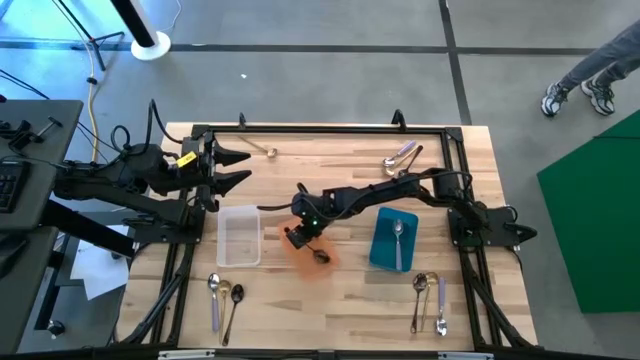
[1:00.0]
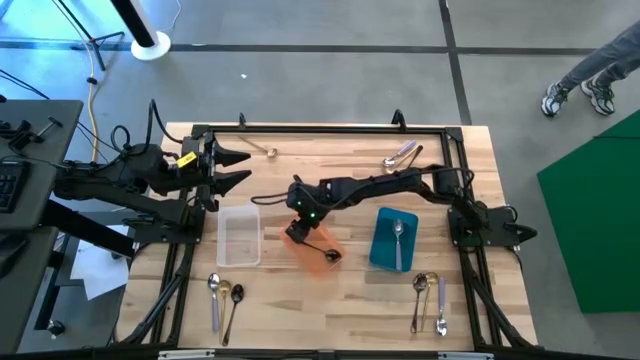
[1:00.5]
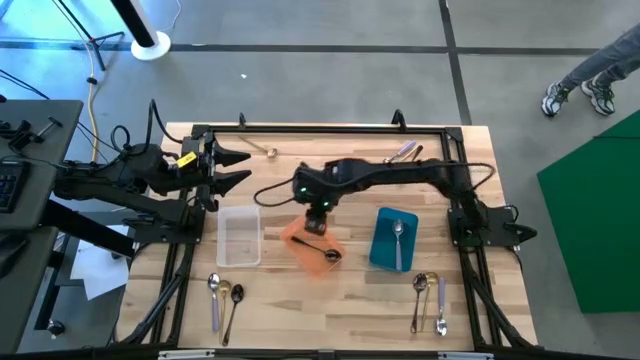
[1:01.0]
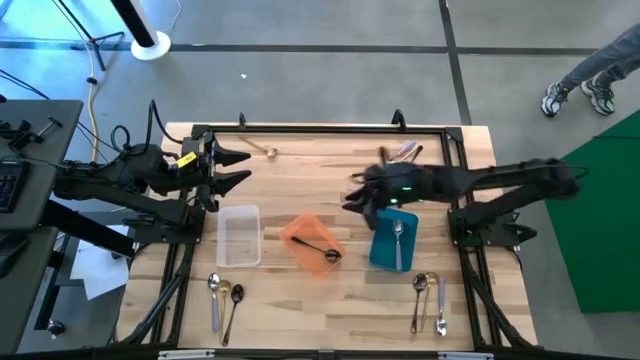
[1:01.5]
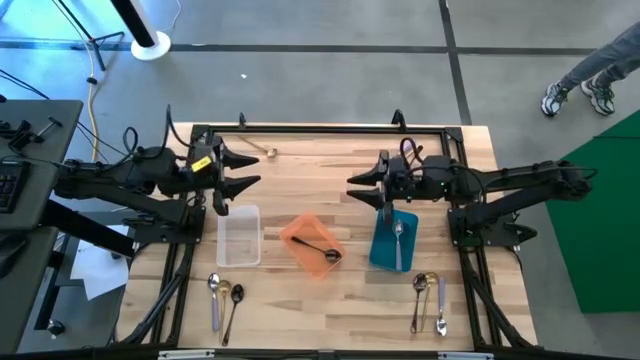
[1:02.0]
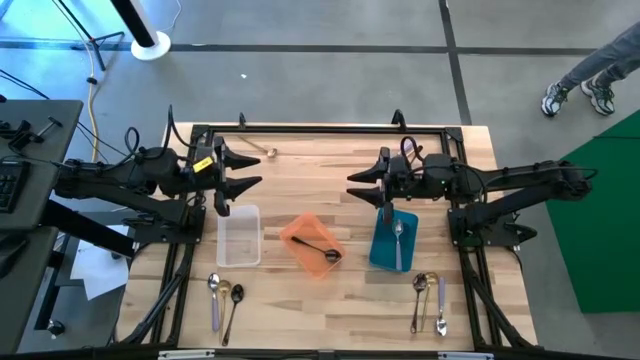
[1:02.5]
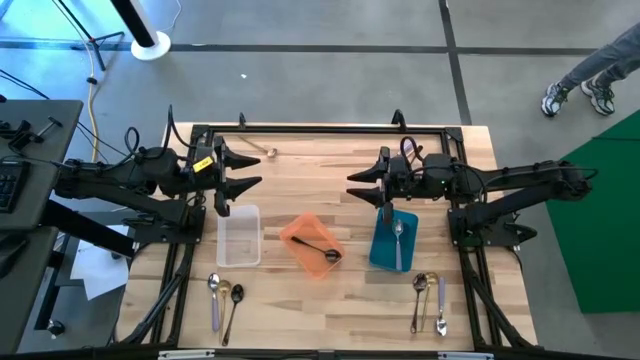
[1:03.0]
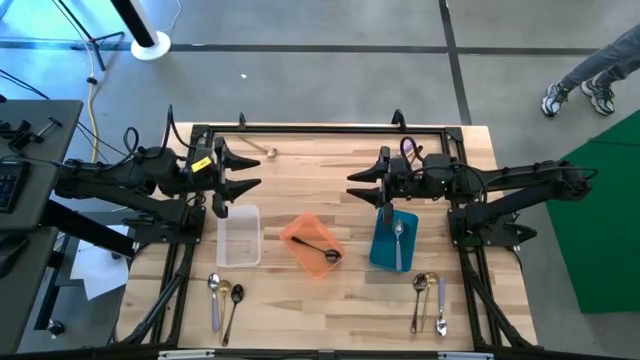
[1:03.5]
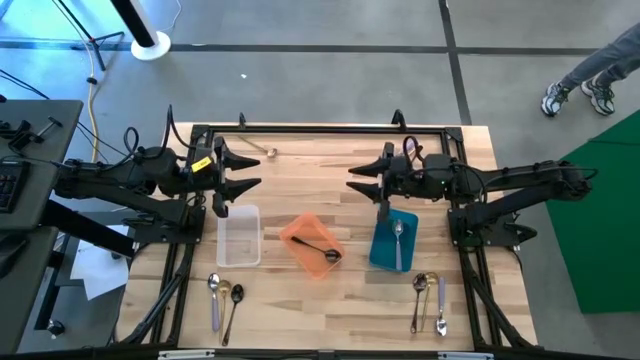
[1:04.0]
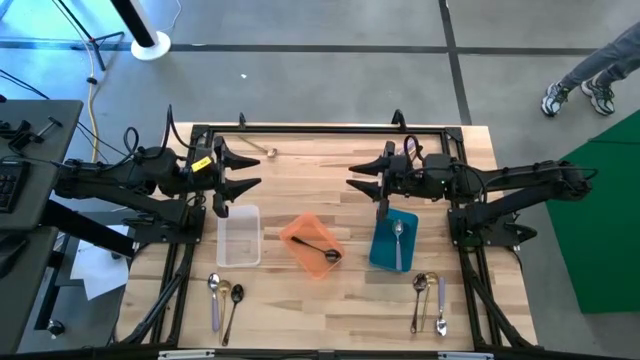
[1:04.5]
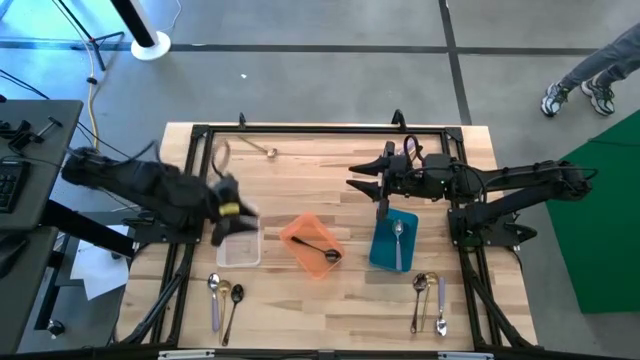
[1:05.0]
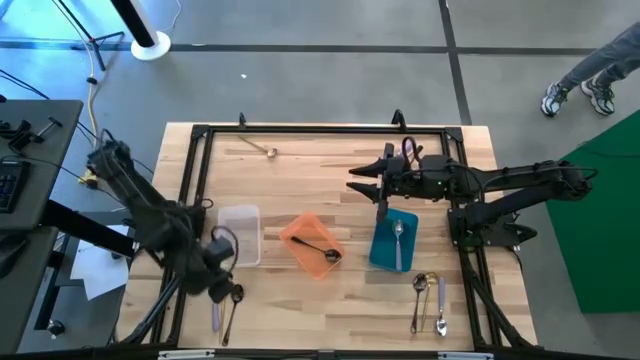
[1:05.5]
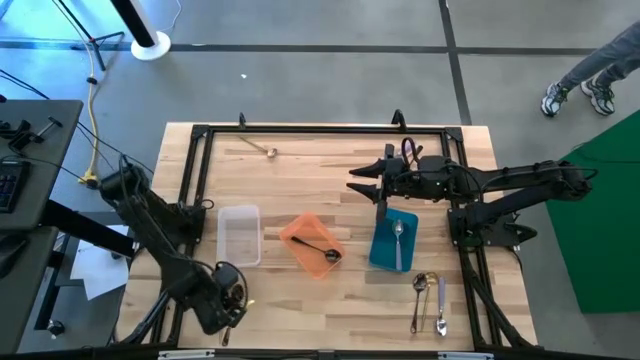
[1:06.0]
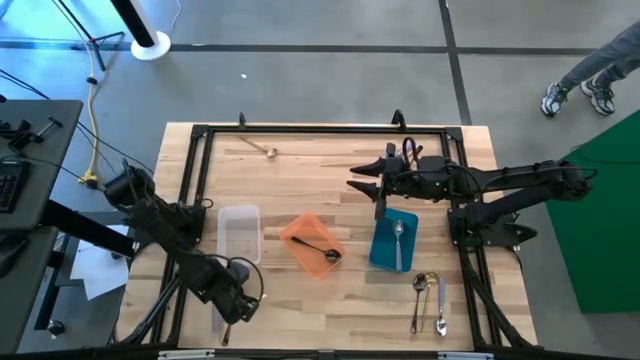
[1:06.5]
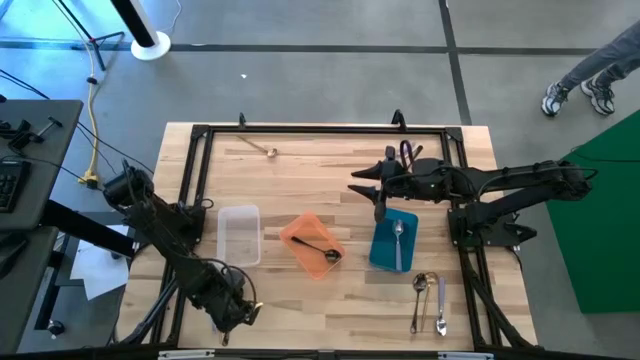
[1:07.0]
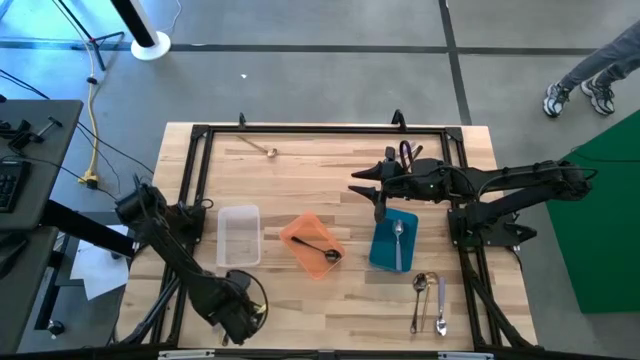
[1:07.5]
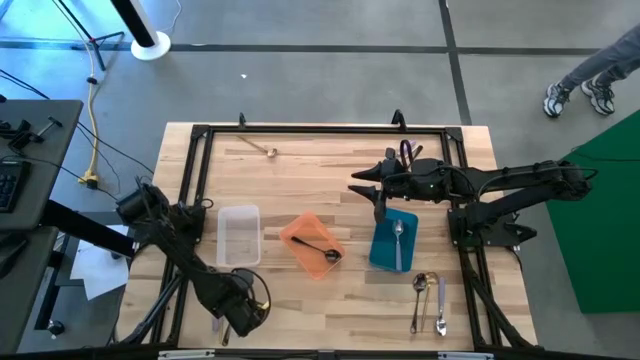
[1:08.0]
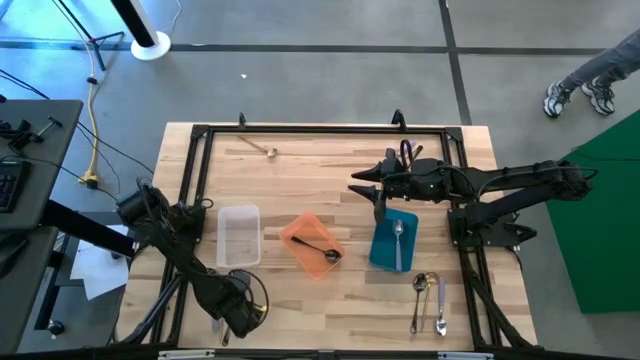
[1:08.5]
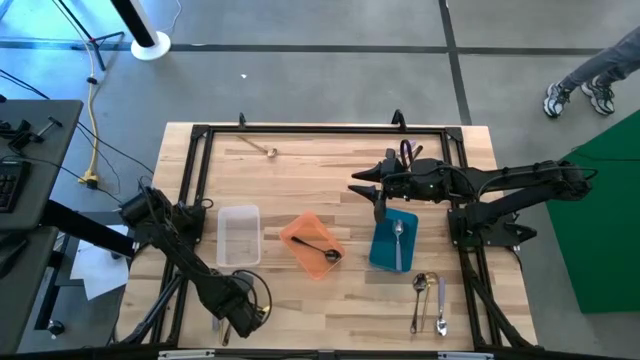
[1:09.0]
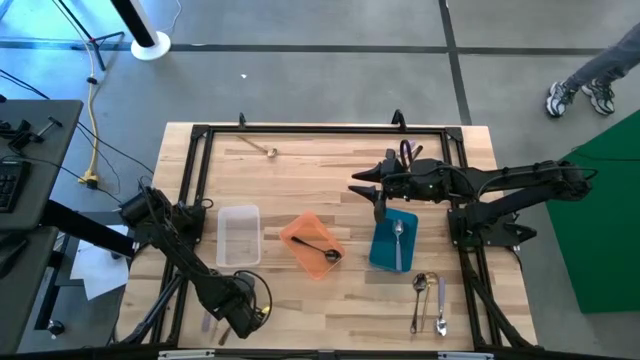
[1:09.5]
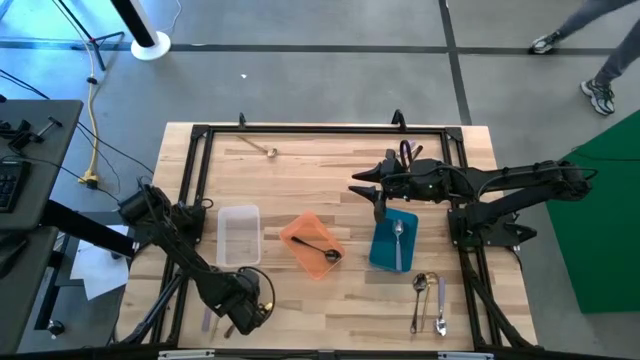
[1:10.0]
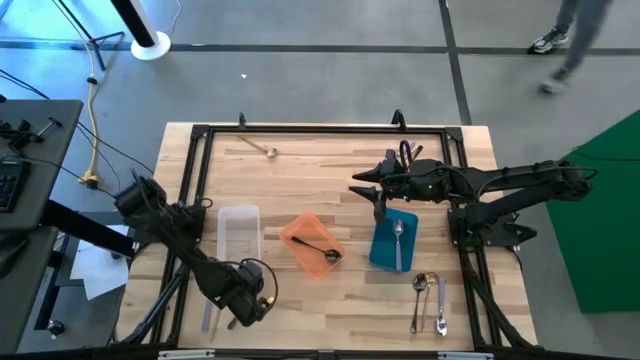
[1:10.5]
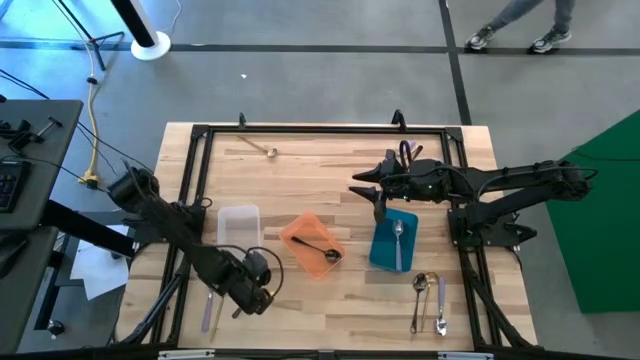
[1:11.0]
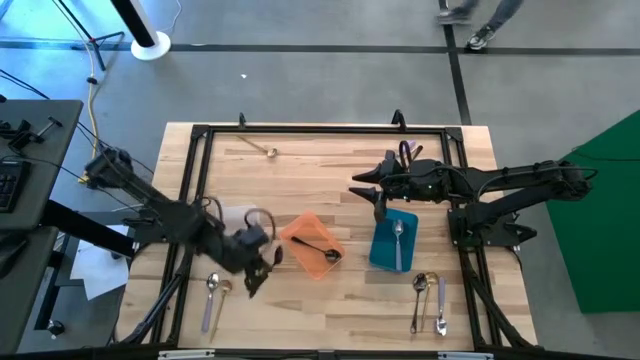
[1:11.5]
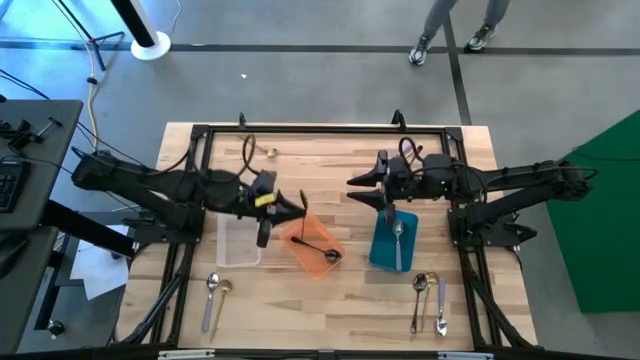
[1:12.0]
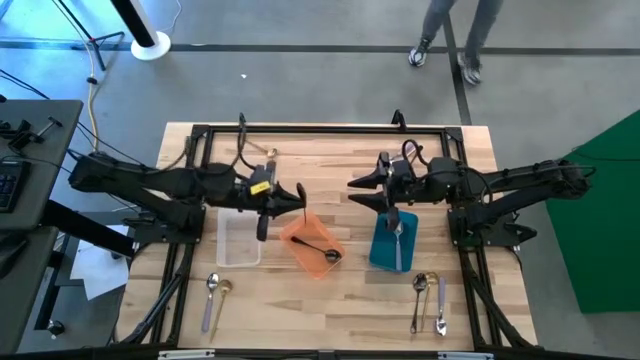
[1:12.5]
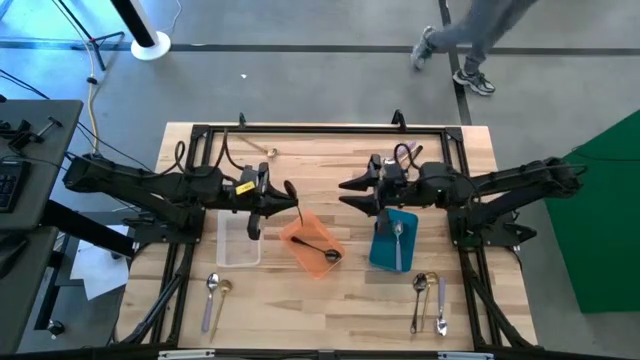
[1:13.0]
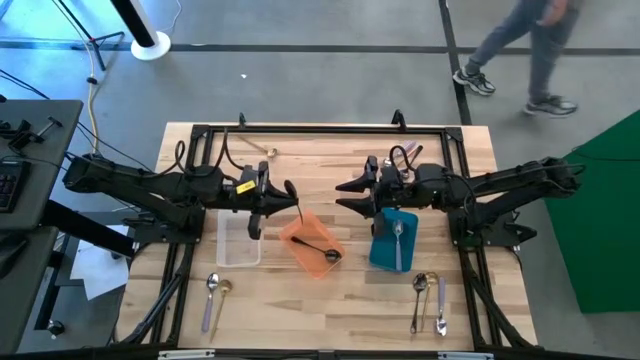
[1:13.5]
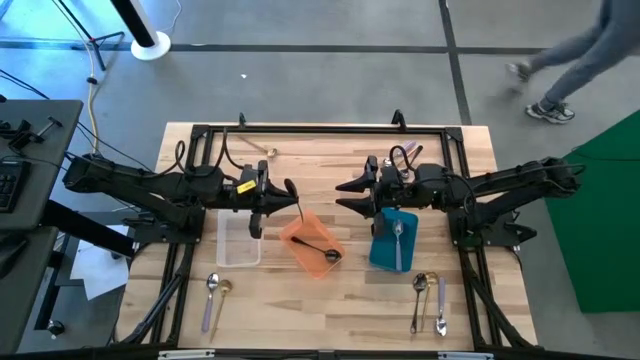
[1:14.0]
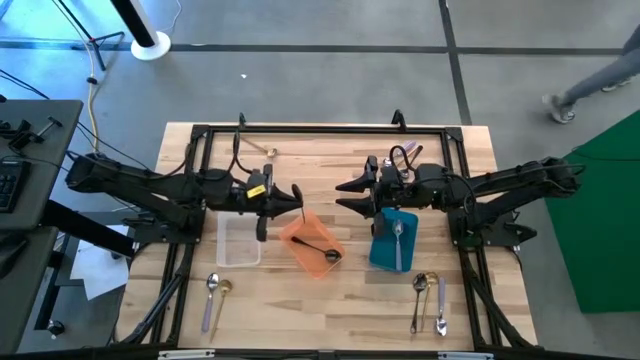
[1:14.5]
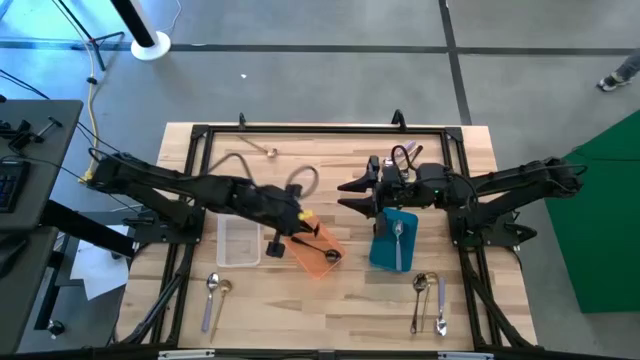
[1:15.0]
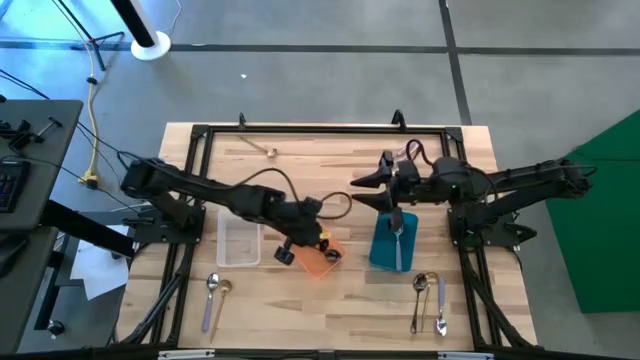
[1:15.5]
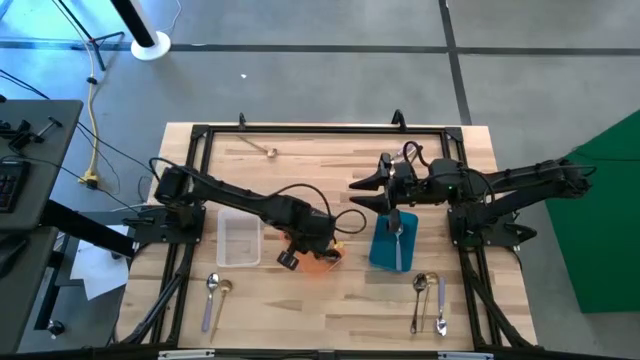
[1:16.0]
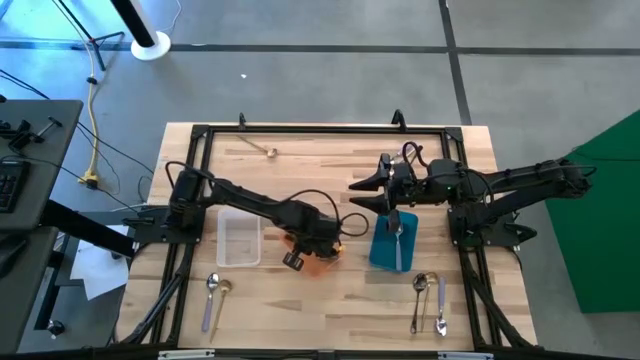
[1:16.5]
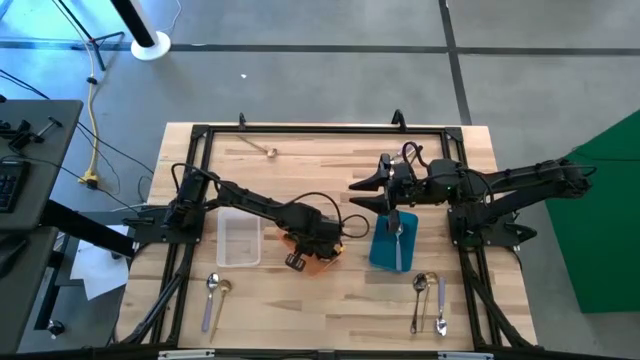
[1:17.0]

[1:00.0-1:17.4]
Task: Sort silverware by color (type)
Put the bottom left black spoon into the orange bin
